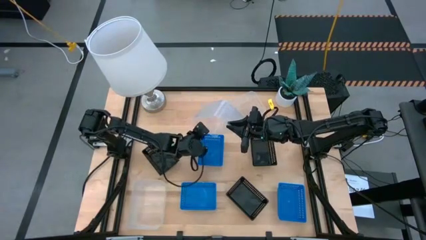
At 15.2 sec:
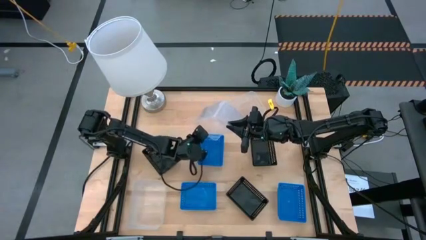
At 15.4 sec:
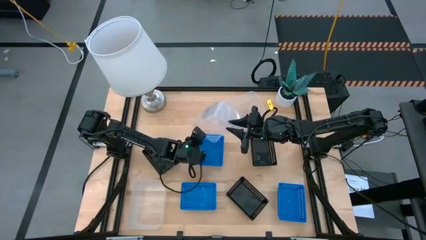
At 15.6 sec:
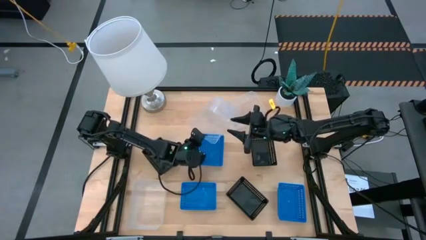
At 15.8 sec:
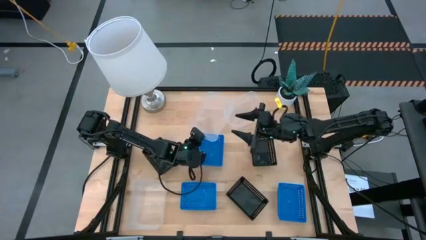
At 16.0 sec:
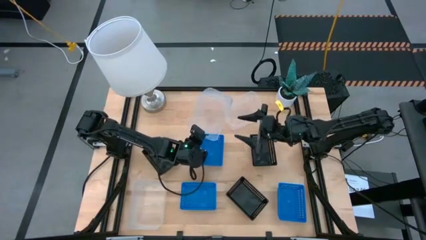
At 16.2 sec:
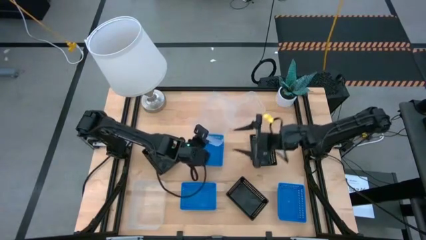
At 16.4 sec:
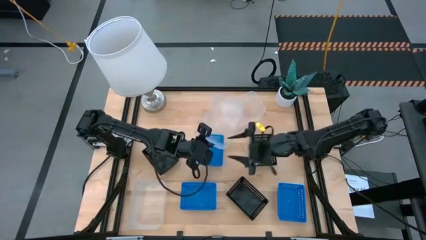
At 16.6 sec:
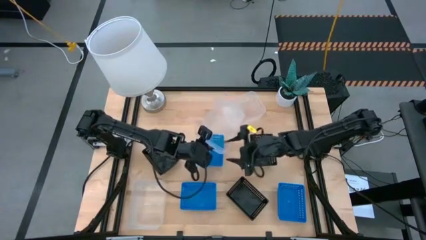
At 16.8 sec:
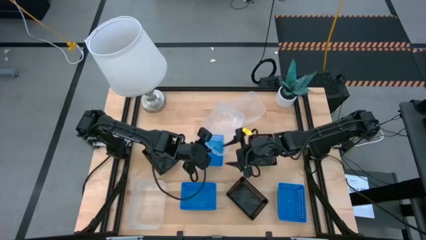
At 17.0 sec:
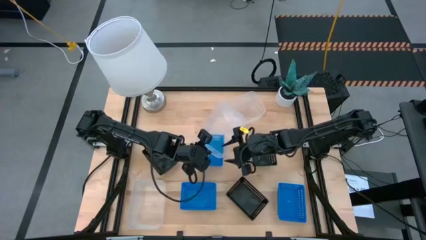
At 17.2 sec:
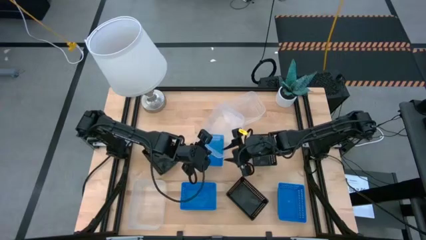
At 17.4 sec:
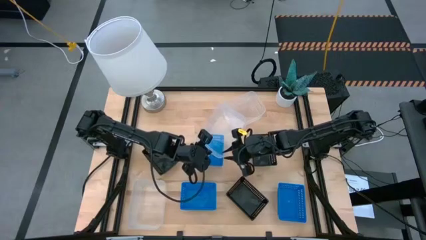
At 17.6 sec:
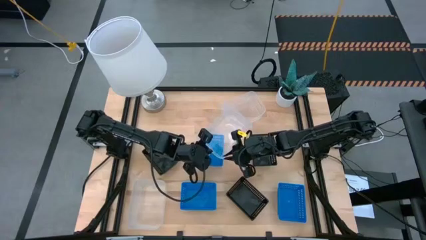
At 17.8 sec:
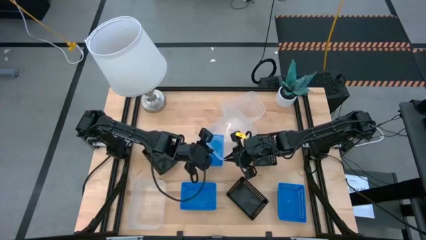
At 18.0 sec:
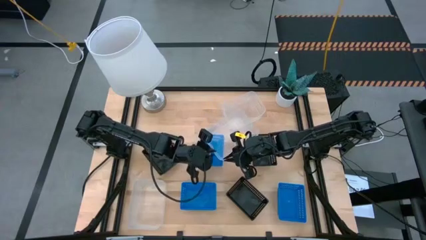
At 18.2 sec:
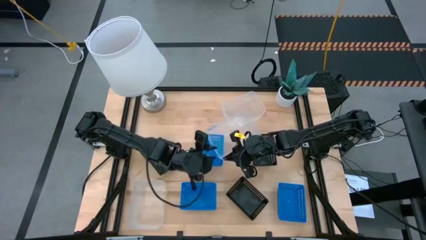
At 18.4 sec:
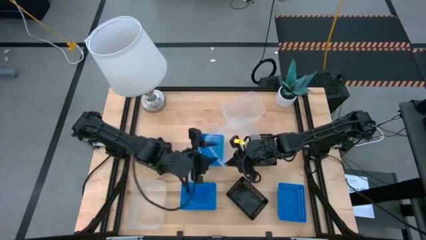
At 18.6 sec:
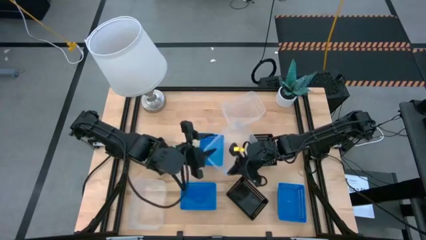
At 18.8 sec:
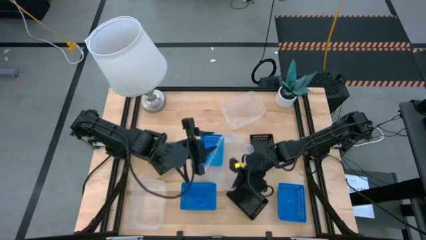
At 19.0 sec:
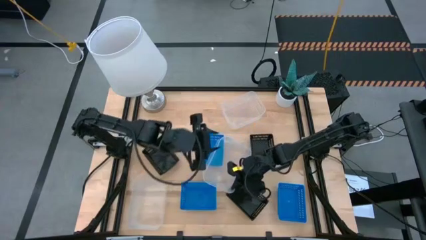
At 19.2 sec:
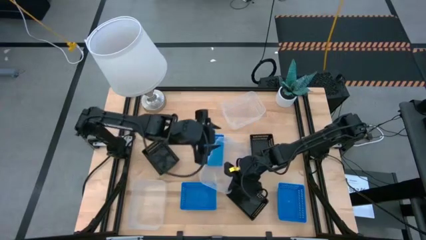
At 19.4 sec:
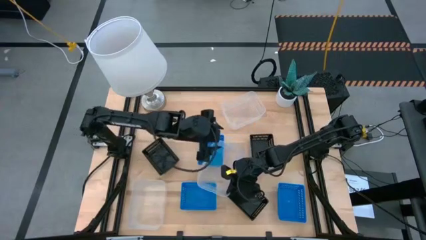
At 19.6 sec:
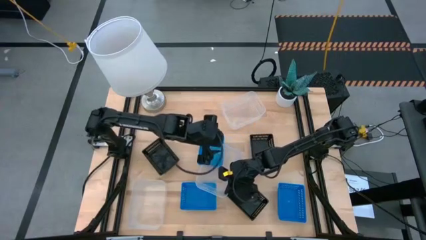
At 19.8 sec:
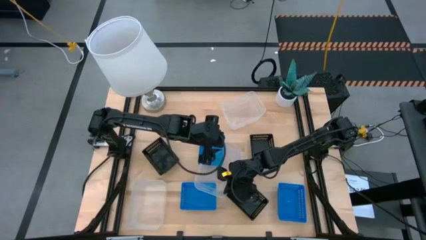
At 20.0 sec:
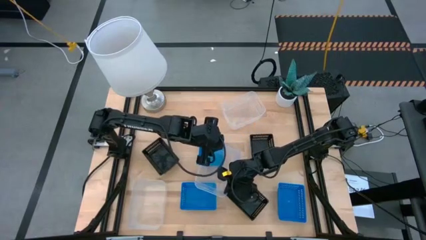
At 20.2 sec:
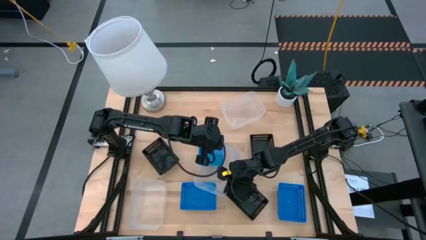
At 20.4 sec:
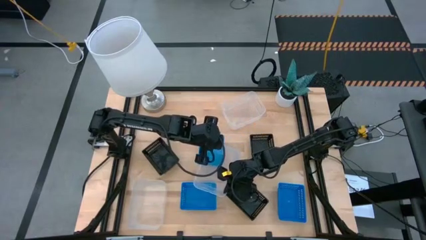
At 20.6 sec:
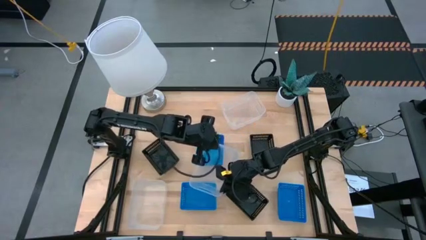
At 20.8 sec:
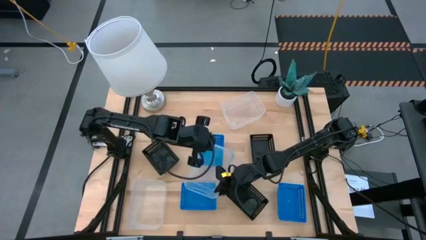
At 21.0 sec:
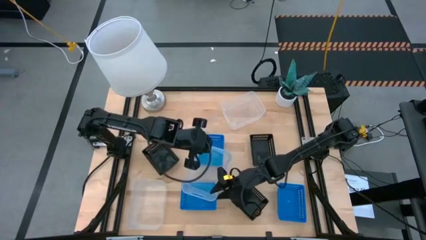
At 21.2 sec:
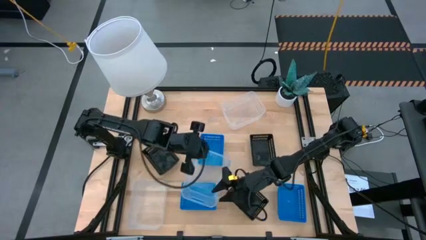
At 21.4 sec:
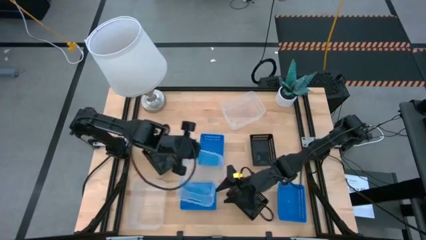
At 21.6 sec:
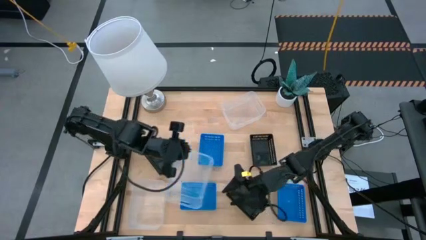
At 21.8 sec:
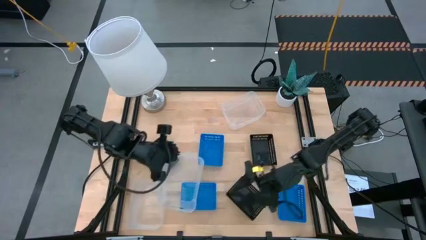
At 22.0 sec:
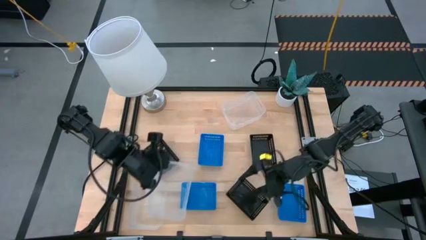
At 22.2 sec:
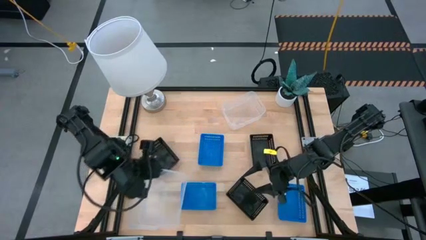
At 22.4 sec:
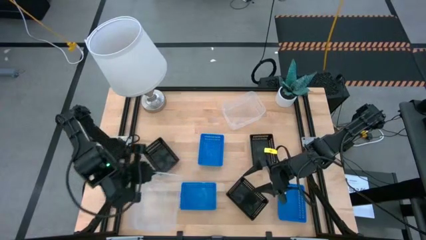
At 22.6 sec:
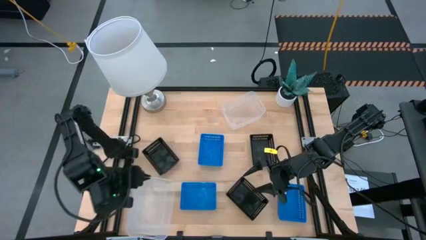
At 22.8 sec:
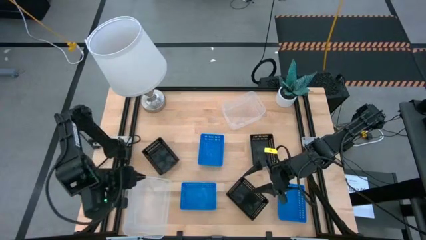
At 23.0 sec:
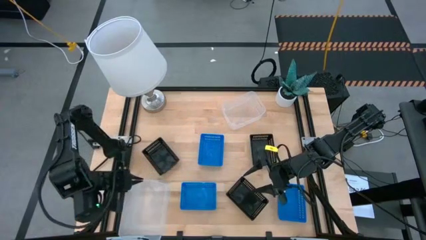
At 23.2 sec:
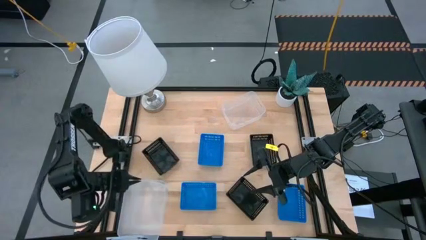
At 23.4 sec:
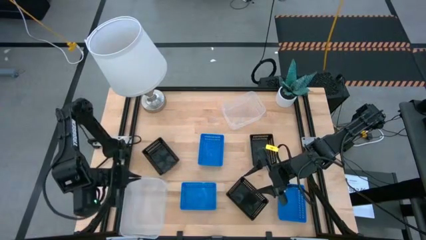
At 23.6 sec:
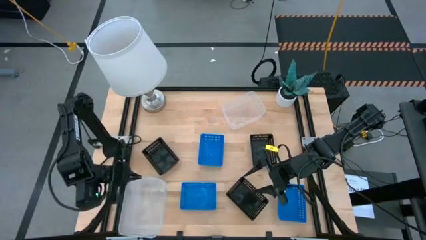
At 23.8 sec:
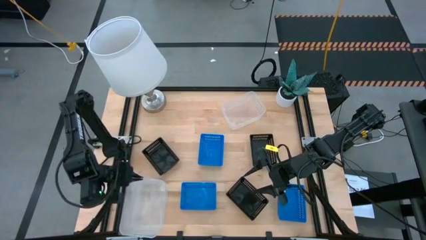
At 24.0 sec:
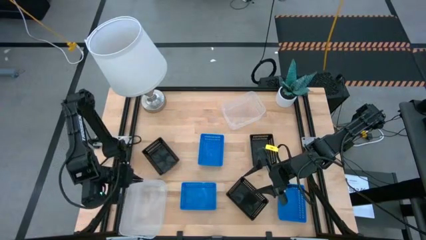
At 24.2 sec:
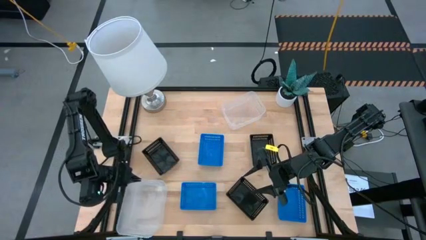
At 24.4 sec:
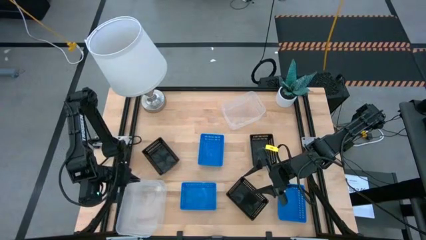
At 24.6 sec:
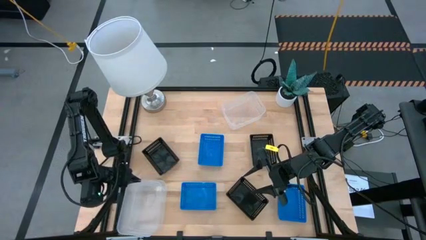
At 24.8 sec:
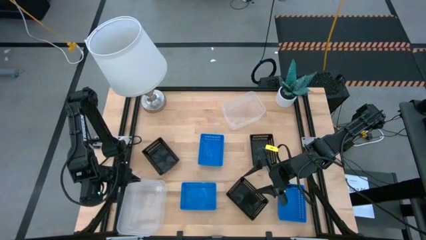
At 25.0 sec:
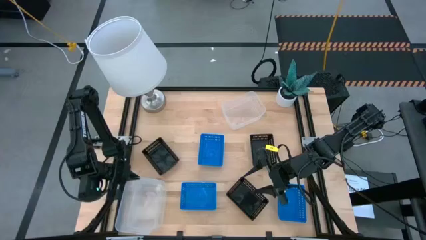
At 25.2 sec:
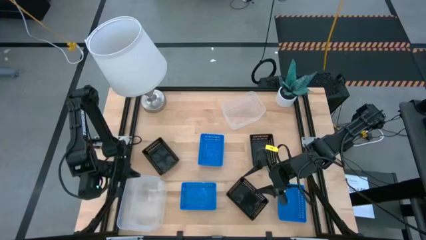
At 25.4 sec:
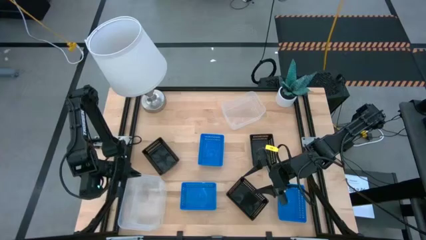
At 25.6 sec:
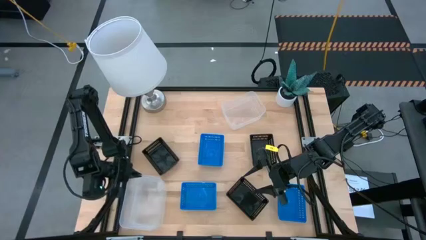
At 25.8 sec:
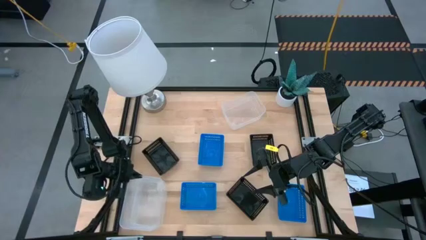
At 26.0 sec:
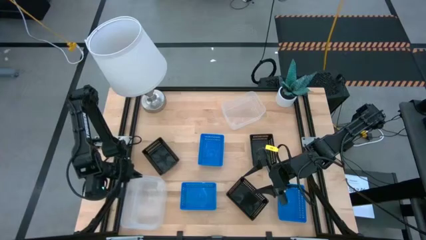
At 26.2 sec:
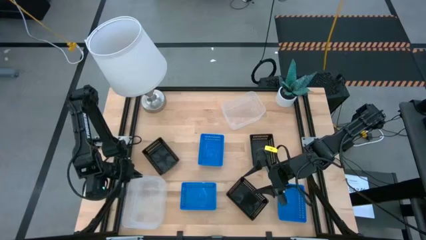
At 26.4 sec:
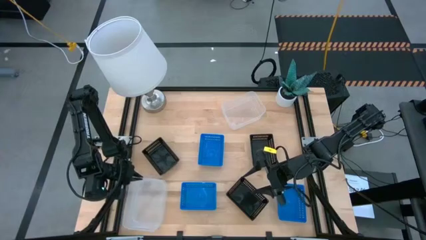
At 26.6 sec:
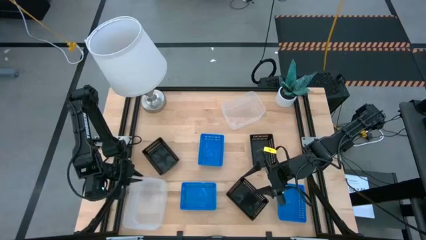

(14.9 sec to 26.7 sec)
Stack the top left transparent bin on the bottom transparent bin
